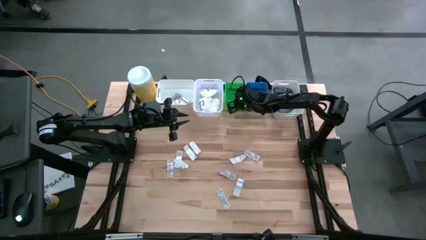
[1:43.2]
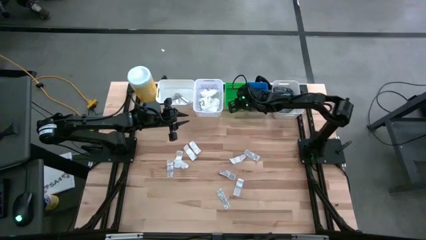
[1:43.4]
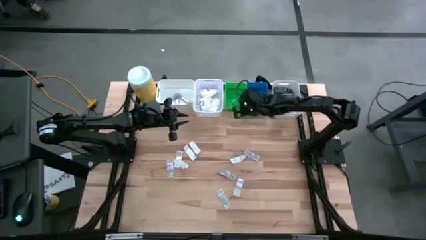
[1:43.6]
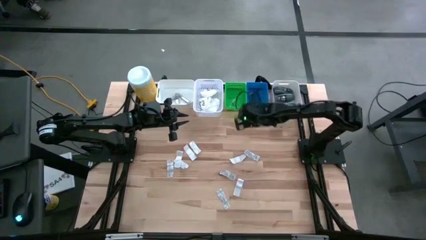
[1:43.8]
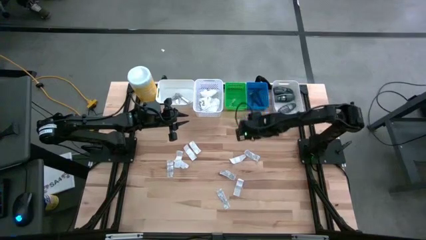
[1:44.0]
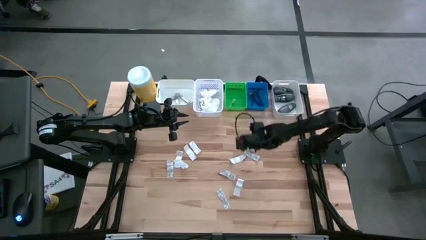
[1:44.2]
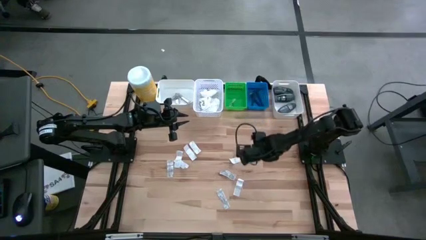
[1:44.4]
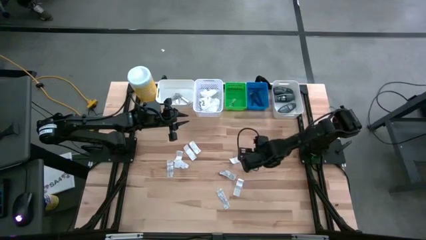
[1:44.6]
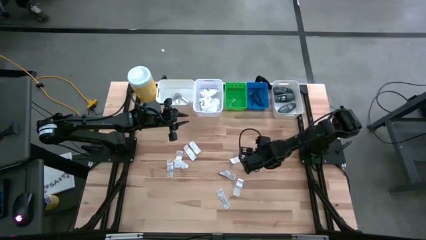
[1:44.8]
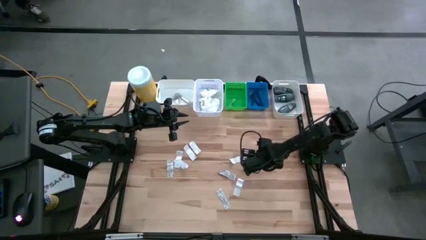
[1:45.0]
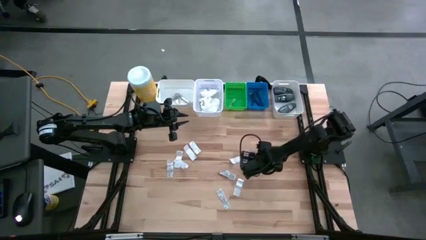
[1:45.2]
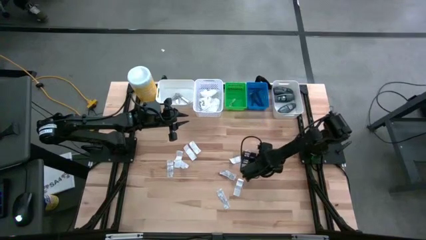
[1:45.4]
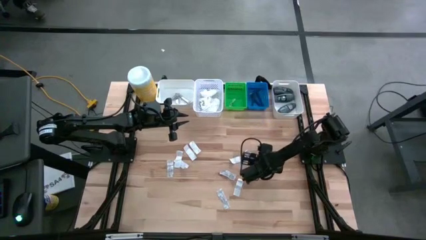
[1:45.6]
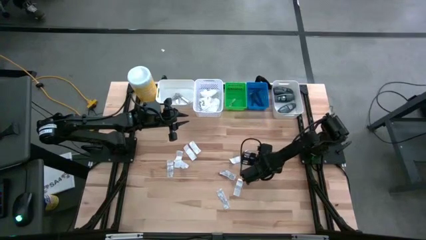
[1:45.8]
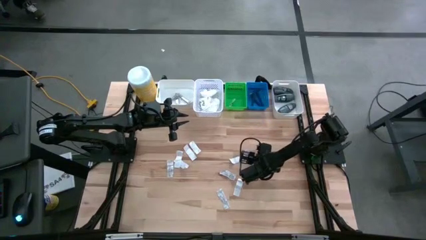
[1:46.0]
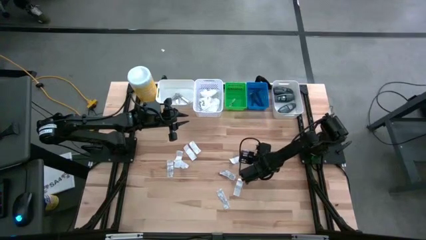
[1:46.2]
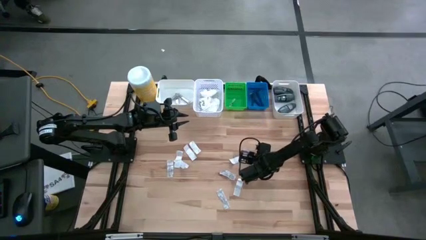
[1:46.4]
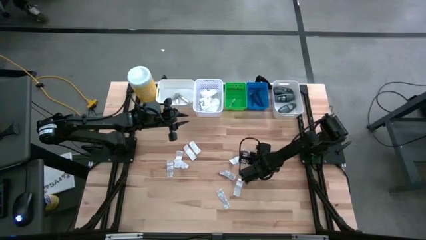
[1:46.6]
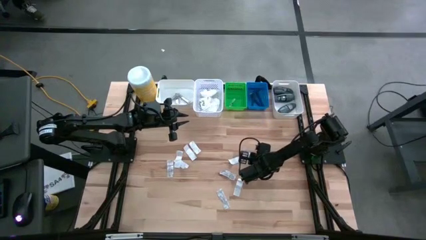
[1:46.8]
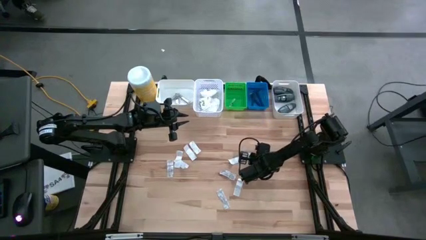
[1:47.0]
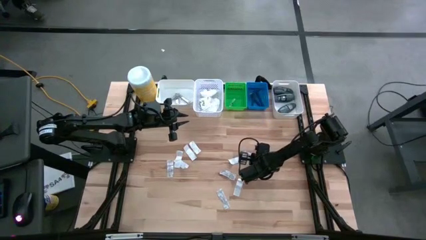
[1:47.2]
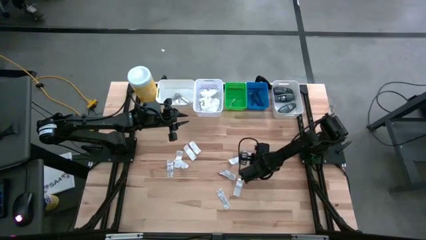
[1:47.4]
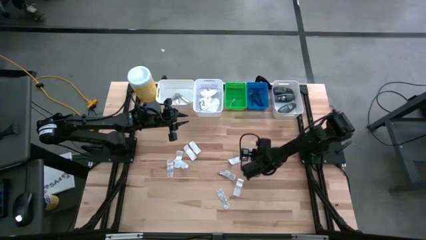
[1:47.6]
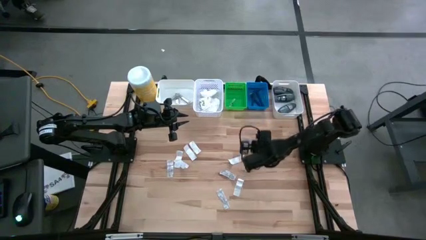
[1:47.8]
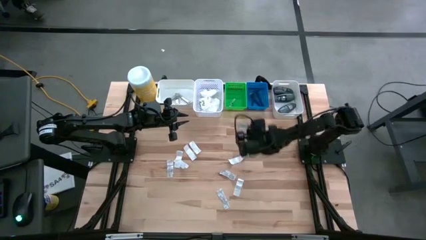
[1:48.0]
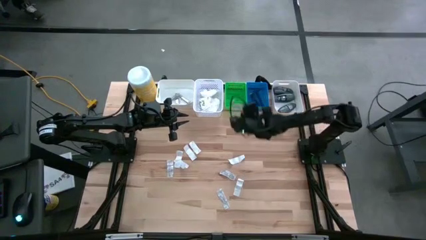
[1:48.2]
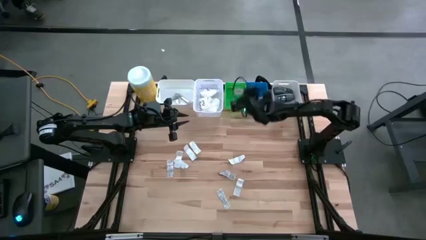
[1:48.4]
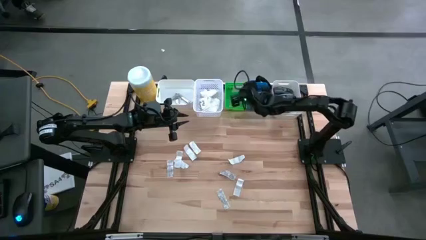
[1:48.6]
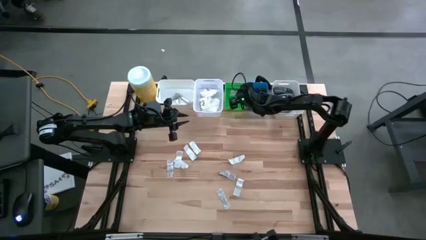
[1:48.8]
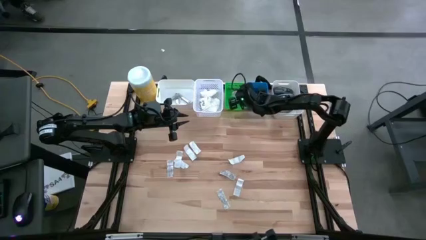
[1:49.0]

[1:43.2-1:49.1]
Task: Pick & Place Travel size toiletries
Put the white bandage into the green bin

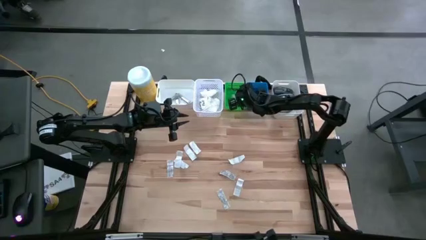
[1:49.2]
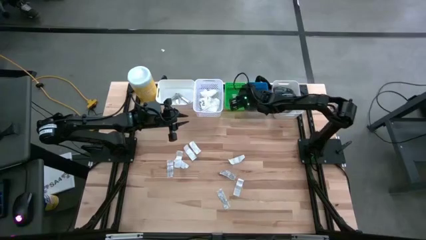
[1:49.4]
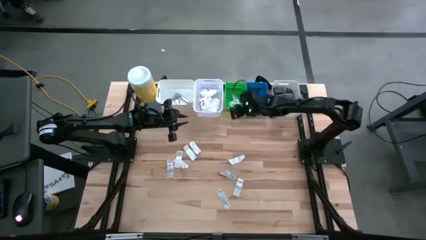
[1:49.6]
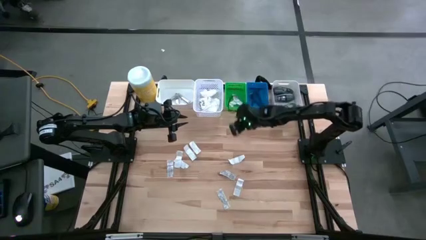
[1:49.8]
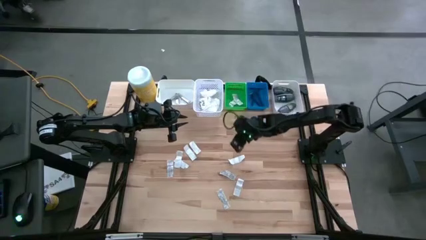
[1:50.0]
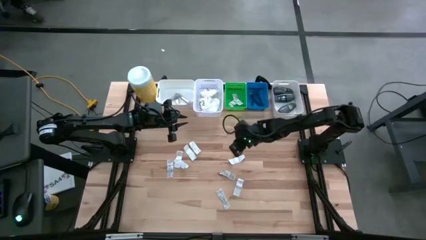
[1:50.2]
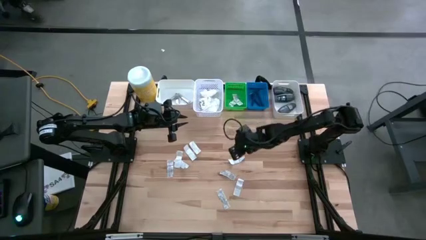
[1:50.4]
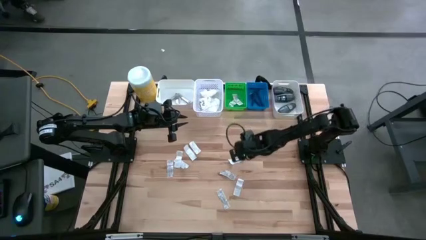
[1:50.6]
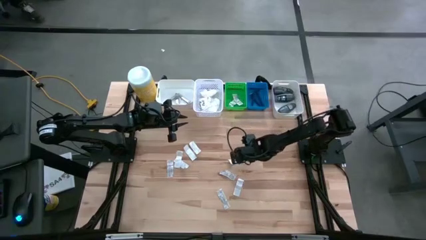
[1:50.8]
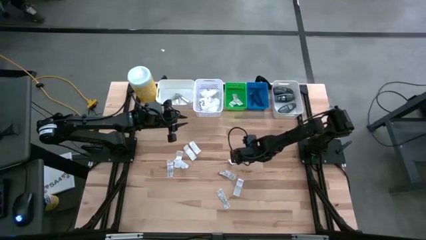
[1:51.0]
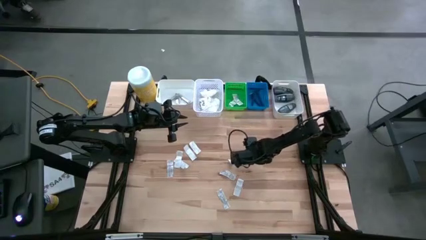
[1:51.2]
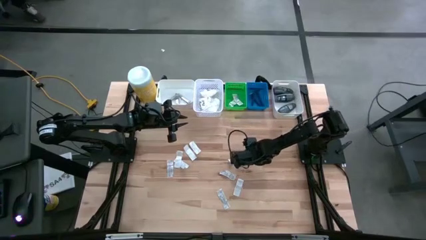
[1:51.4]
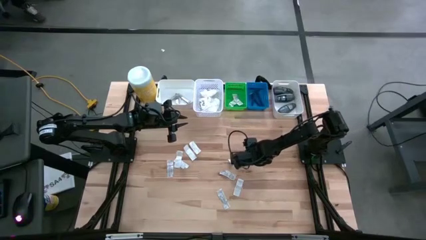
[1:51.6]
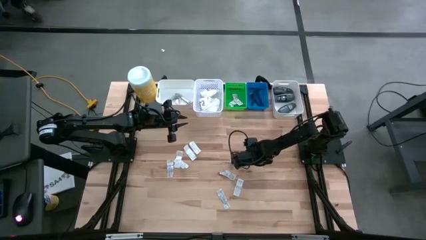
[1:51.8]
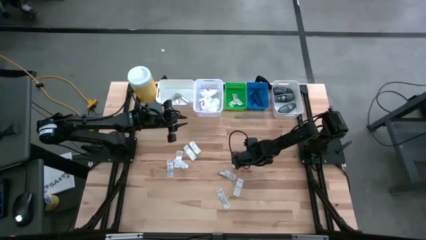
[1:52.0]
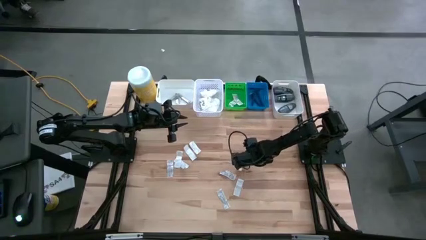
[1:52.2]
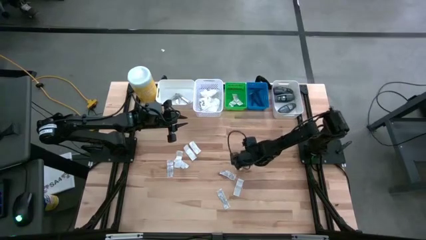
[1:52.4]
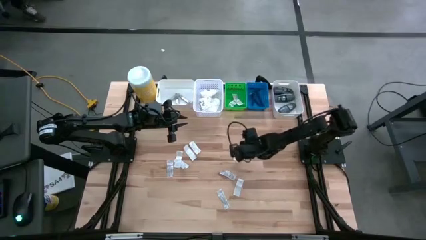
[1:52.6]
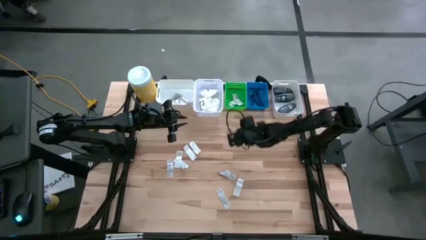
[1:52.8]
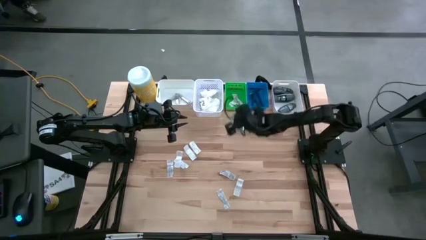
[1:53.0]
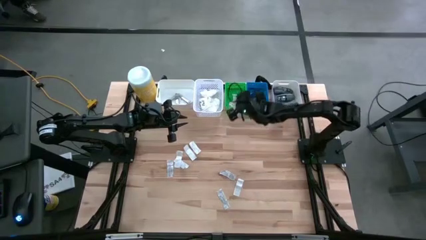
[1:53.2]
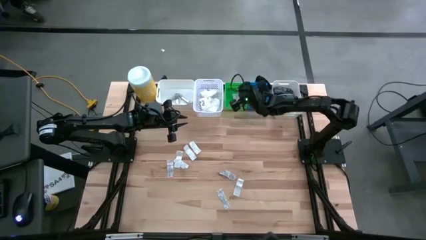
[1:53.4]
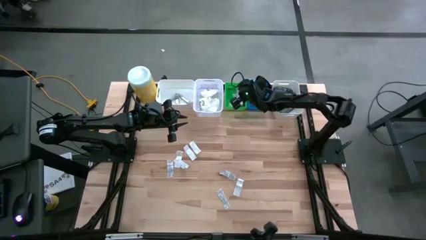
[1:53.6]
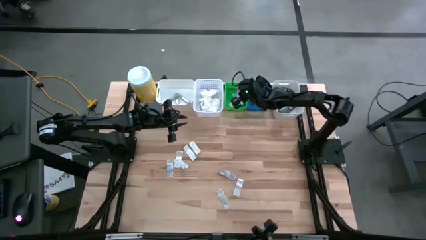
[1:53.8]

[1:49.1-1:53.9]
Put the white bandage into the green bin

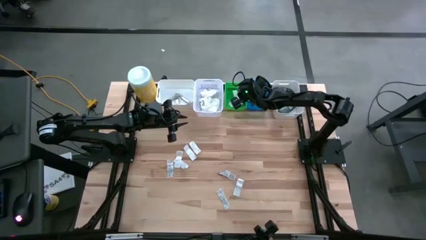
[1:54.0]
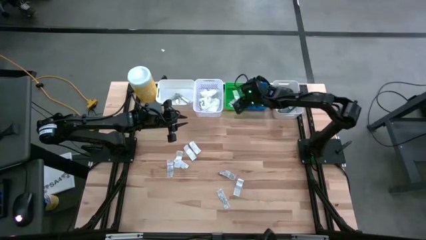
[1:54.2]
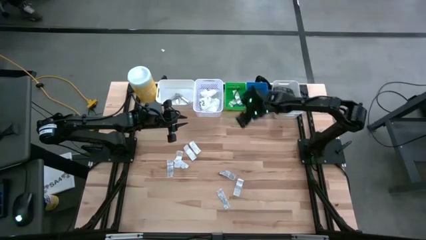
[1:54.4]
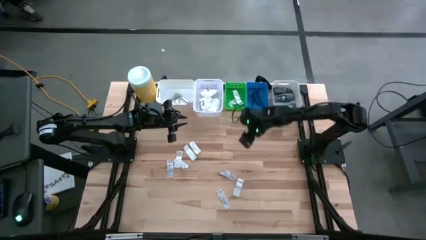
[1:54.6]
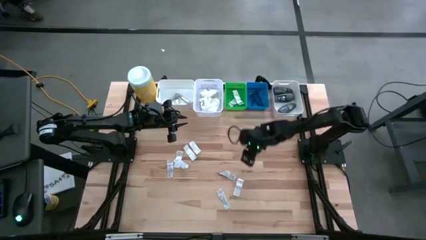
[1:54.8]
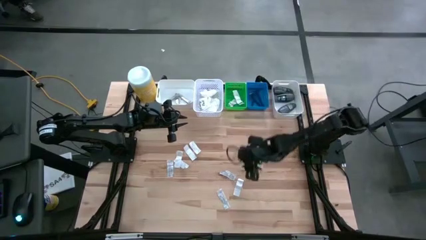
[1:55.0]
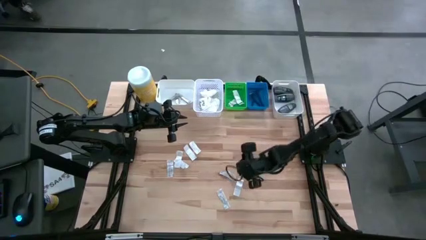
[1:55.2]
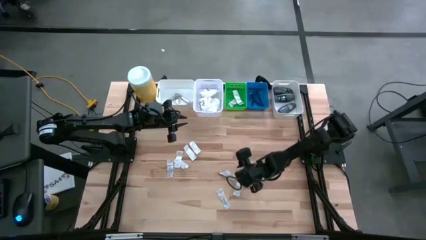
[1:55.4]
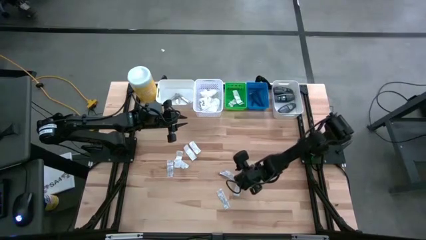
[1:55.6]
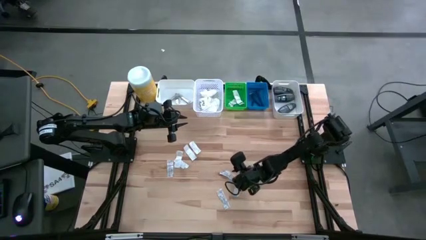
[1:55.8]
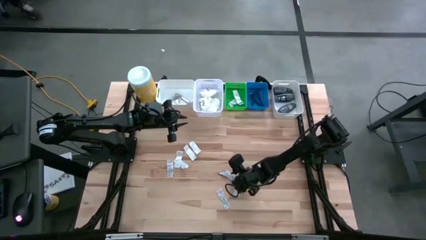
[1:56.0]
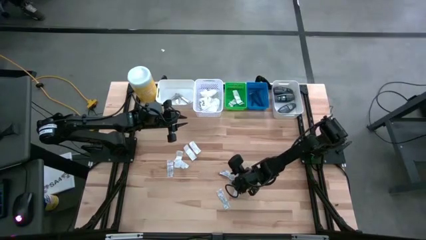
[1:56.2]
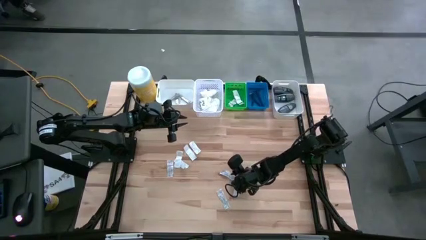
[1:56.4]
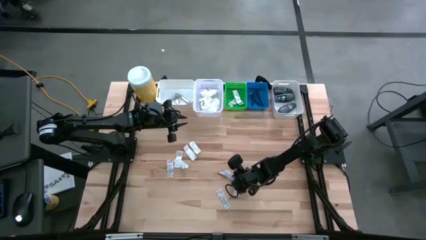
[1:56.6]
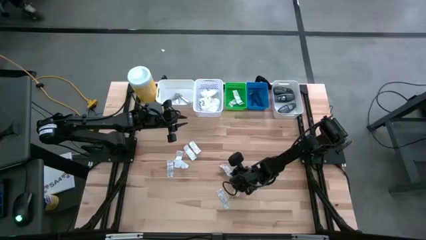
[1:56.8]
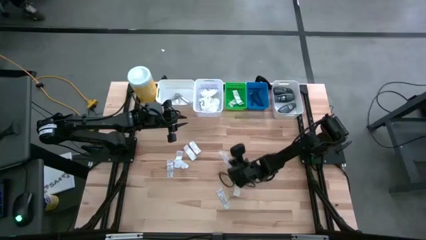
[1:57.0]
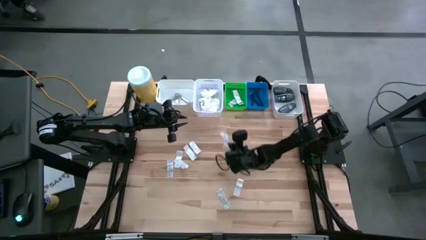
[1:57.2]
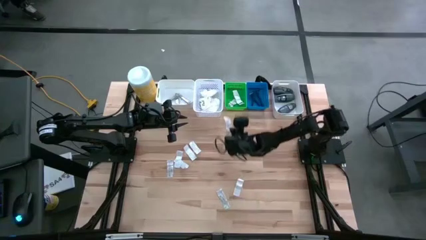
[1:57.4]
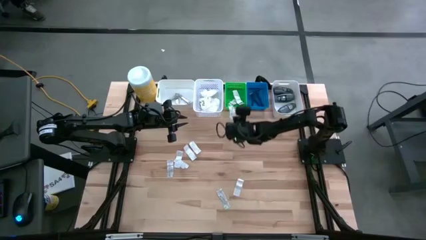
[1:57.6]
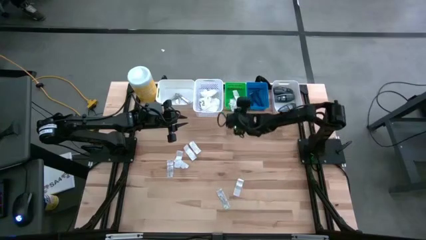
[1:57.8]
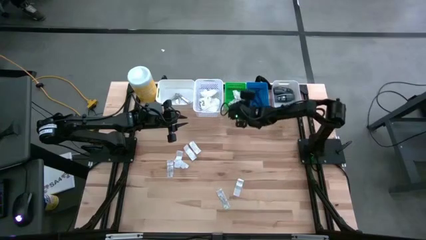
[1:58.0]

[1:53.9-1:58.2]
Put the white bandage into the green bin

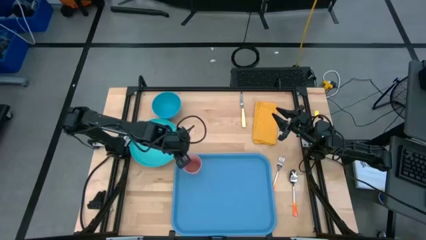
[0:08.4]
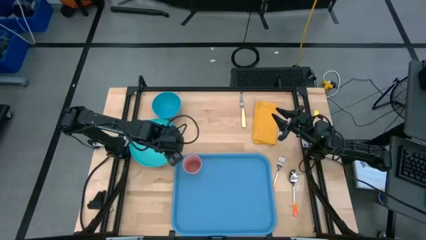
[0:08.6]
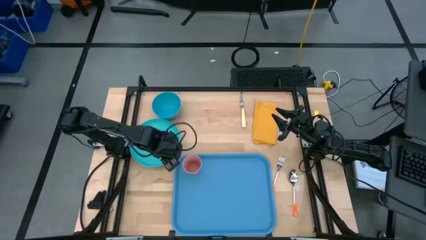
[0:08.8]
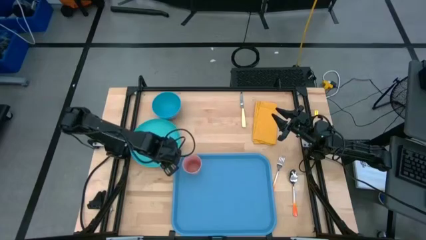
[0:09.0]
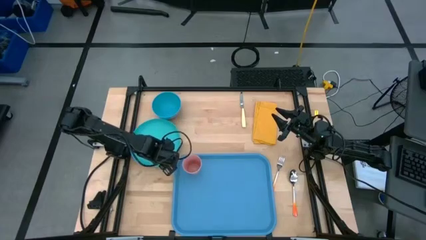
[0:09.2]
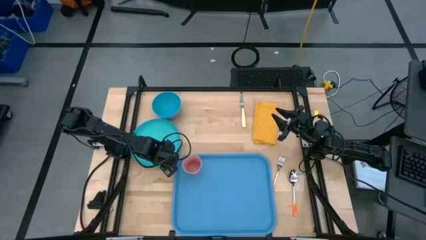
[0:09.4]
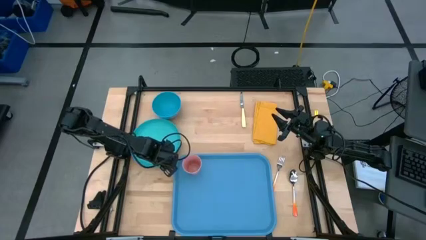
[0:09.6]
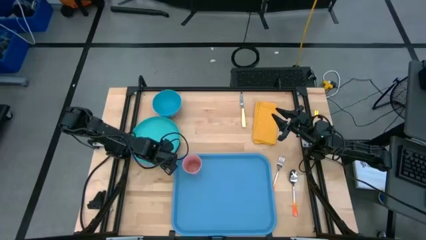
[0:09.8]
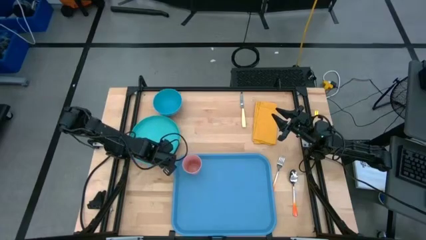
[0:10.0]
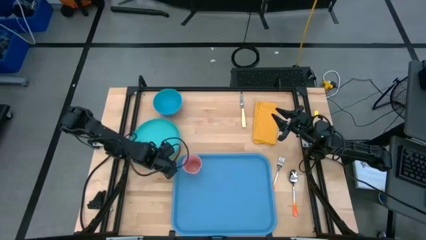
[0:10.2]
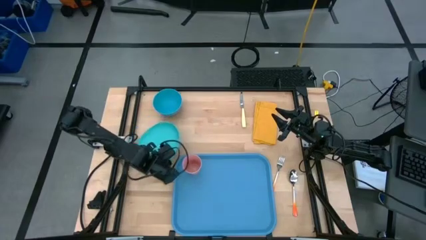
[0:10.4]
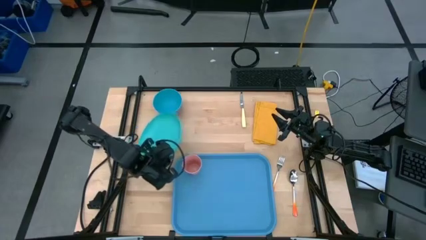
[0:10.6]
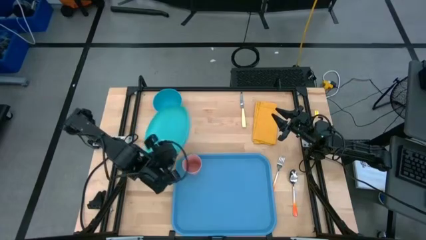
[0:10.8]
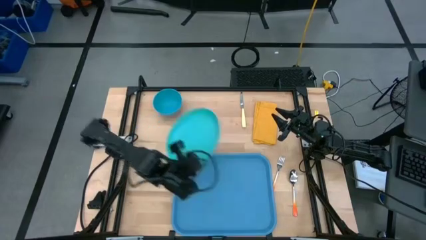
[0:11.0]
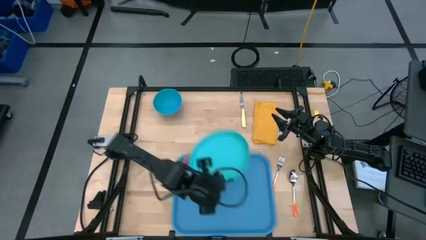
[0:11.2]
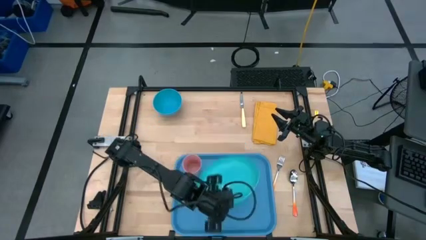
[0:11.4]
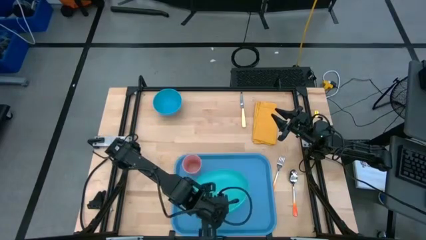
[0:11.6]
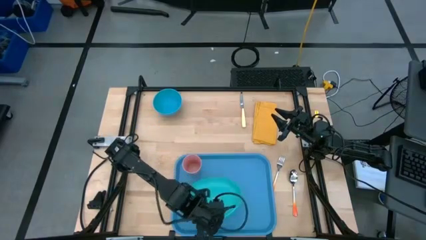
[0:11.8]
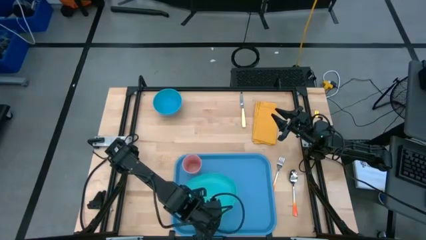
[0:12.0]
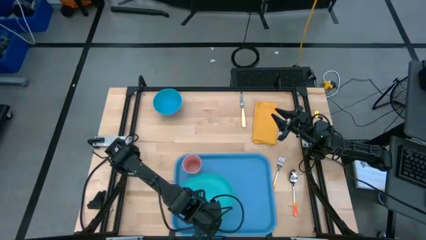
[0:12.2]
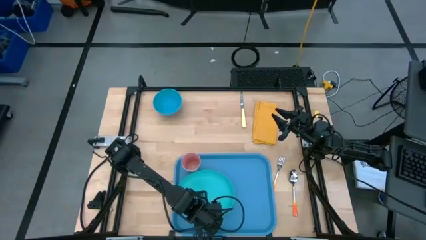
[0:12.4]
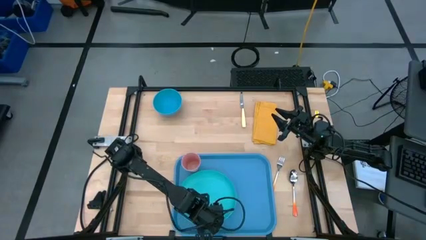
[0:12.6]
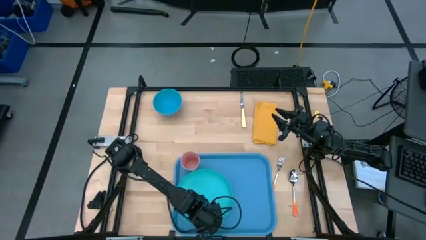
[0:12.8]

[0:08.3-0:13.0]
Task: Set up tray
Put the light blue plate on the blue tray
